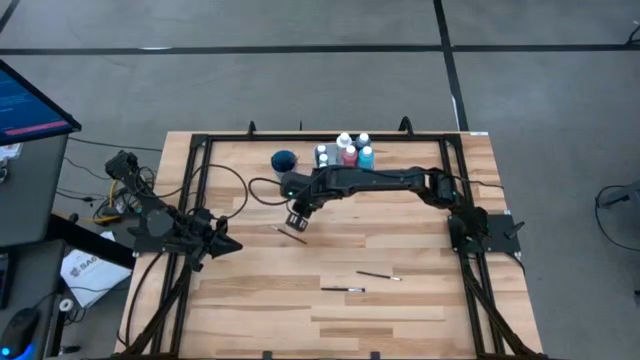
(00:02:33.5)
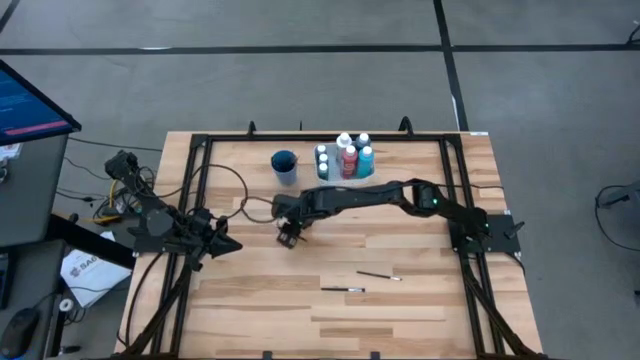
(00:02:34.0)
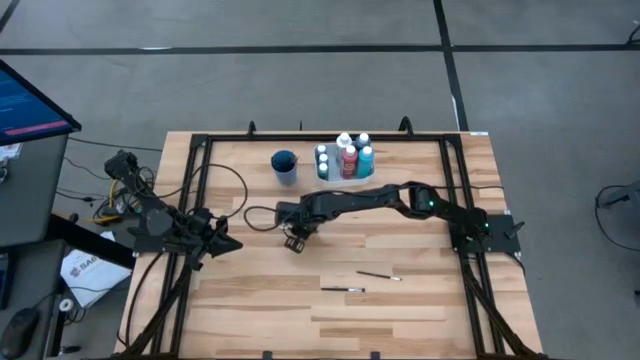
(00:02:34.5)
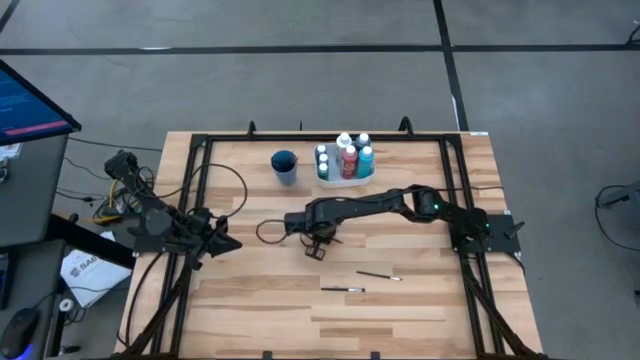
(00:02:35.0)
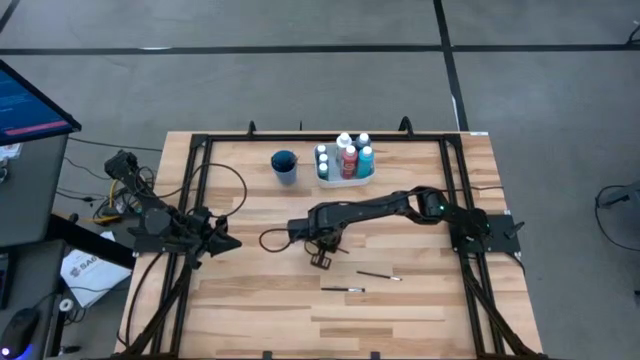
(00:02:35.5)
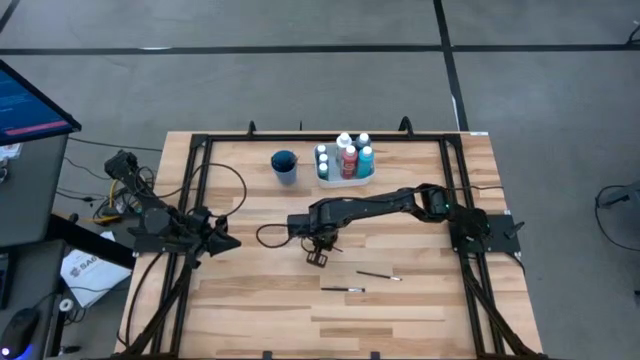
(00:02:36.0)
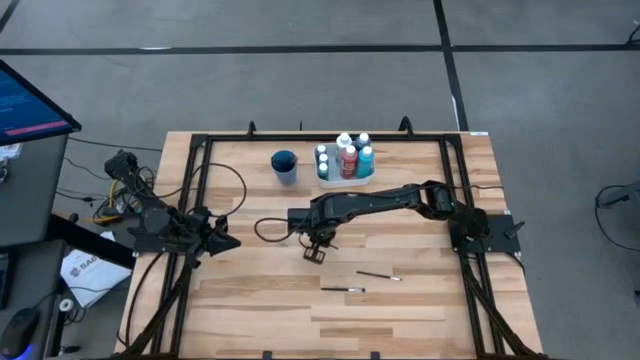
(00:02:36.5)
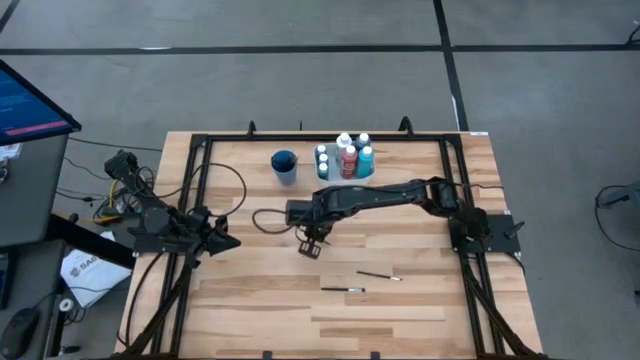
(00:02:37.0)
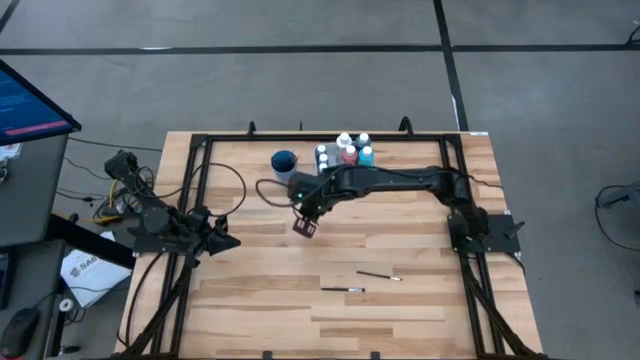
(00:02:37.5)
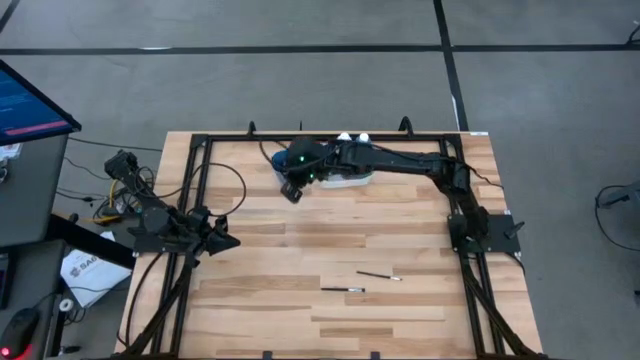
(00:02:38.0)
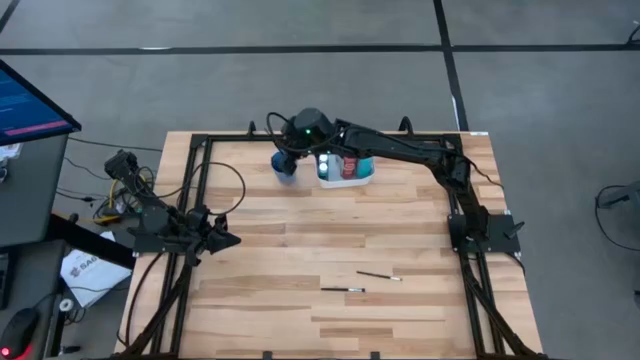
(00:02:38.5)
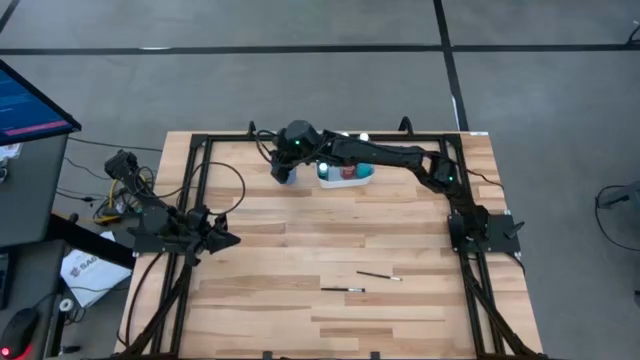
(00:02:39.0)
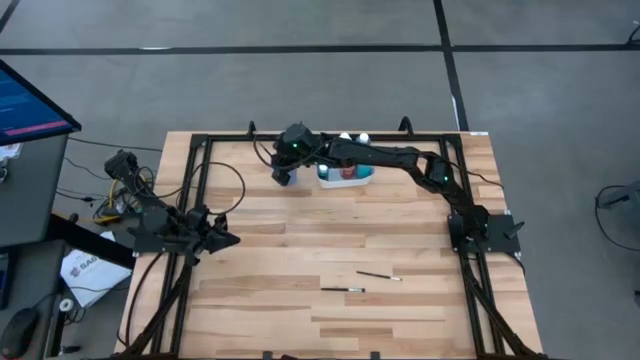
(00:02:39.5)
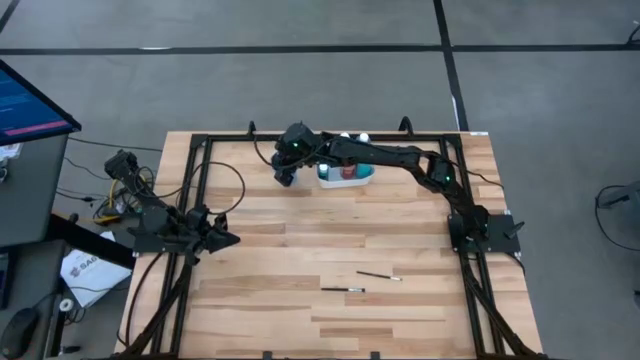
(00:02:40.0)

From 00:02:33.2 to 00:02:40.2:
Task: Pick & Place Paint Supplies
Put the silver and black paint brush into the blue cup

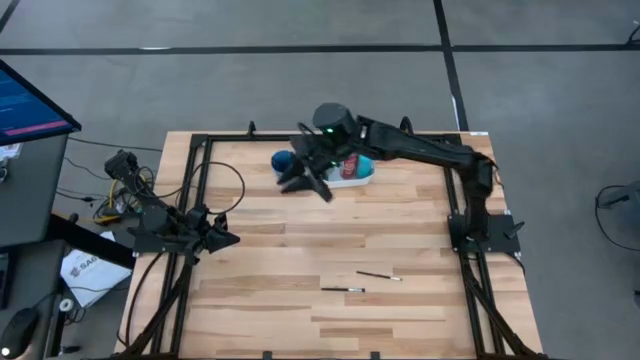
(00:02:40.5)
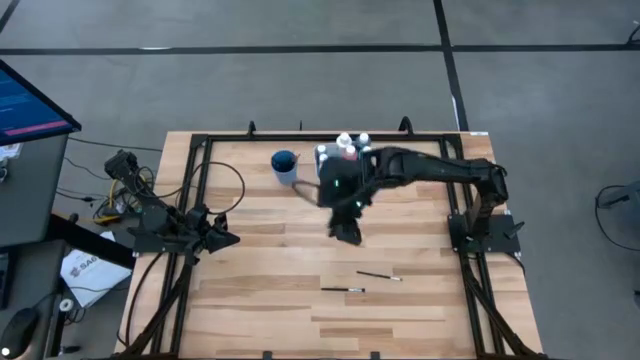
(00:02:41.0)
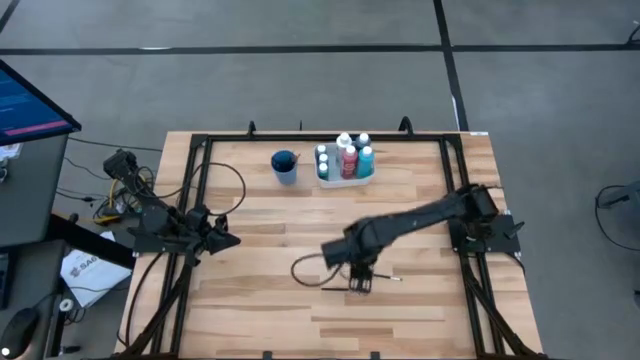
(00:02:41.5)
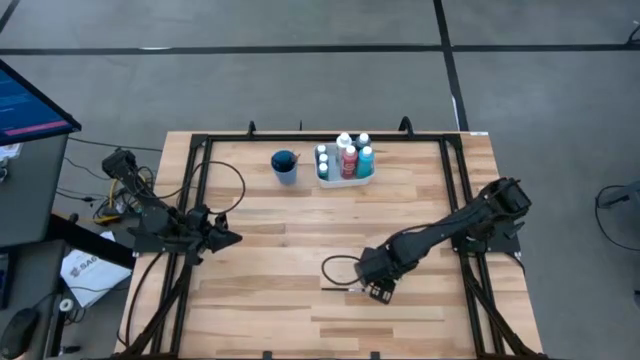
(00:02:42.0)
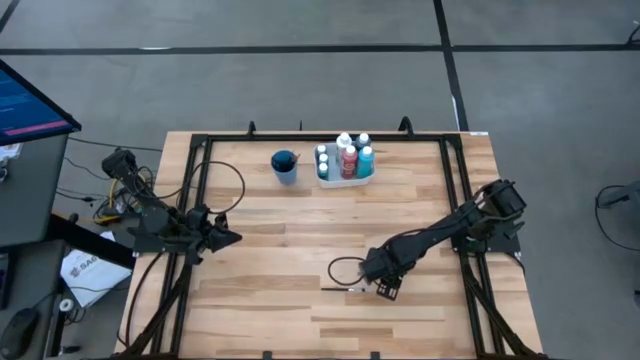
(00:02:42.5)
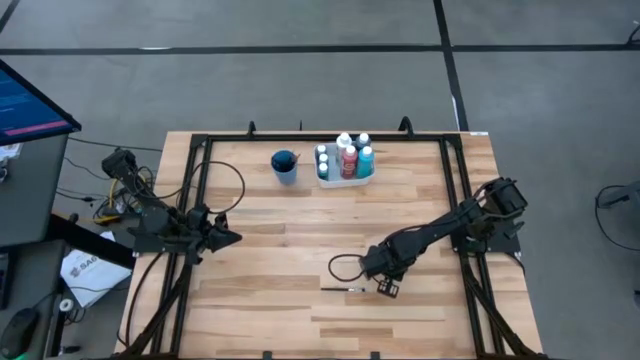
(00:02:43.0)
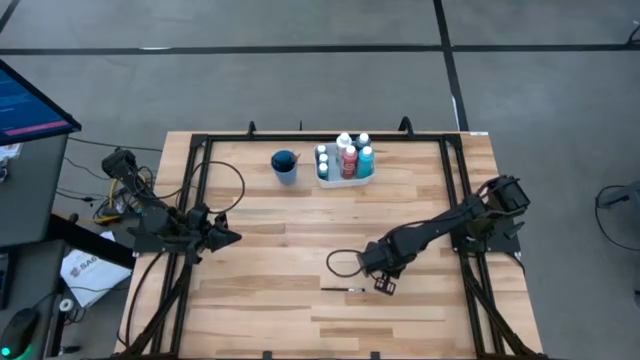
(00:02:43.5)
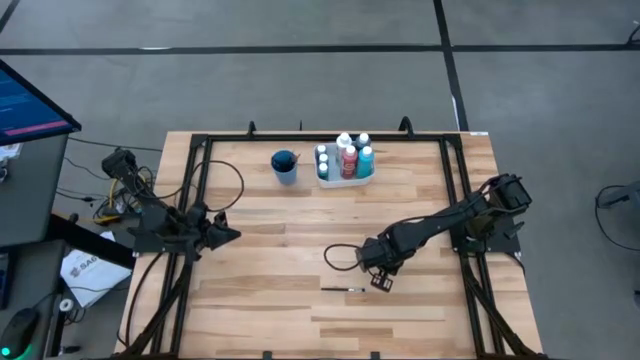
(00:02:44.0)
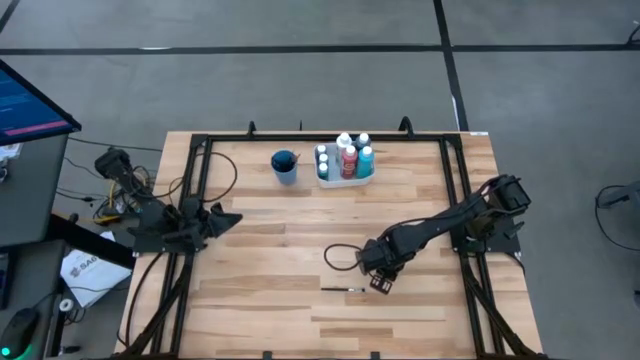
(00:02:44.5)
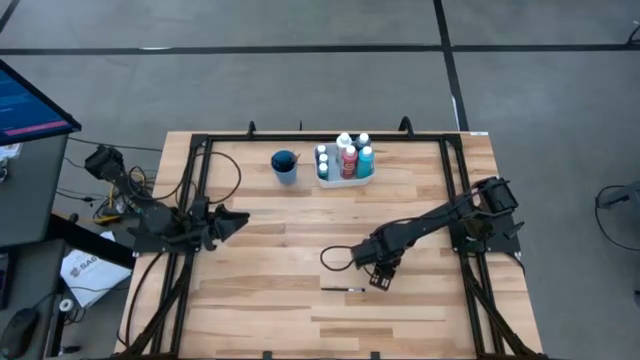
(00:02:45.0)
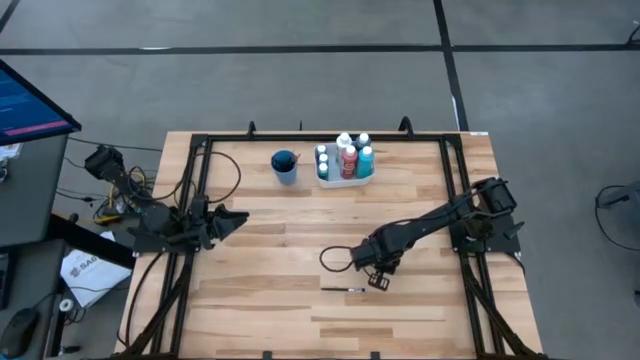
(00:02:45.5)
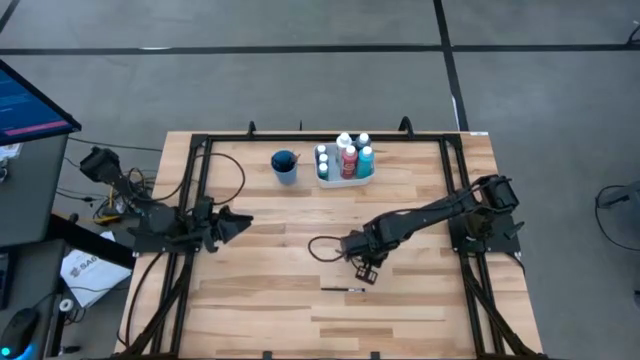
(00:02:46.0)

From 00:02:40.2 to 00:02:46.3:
Put the silver and black paint brush into the blue cup

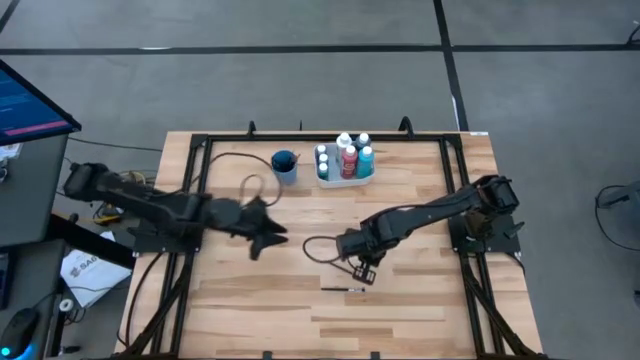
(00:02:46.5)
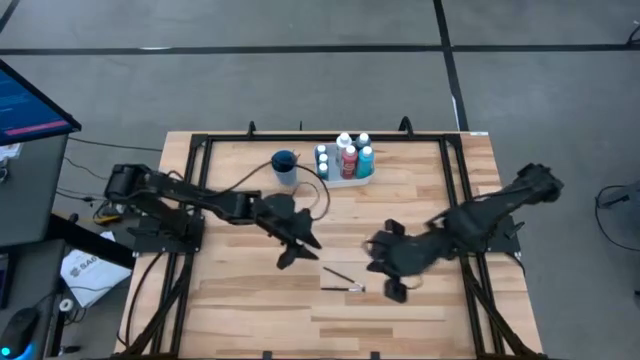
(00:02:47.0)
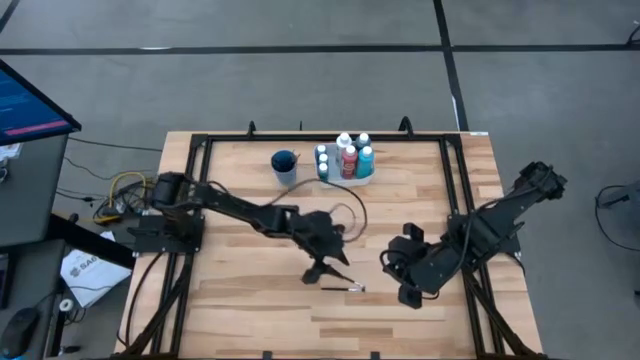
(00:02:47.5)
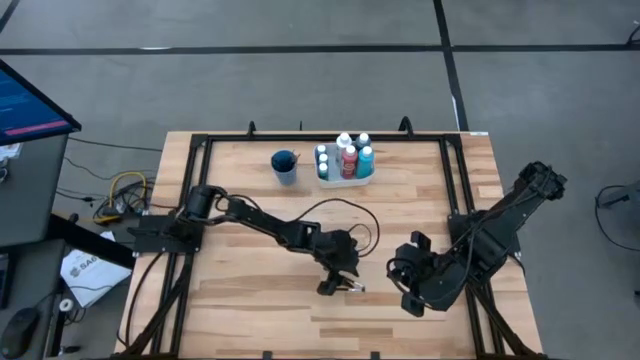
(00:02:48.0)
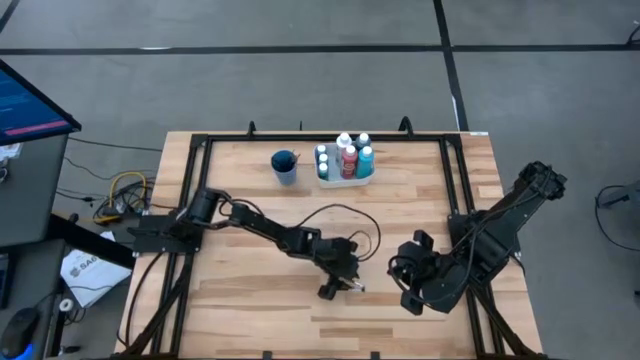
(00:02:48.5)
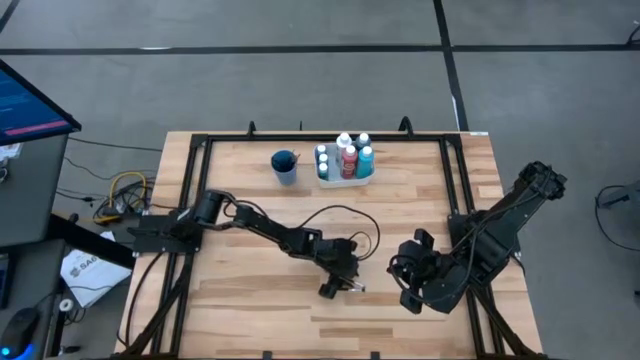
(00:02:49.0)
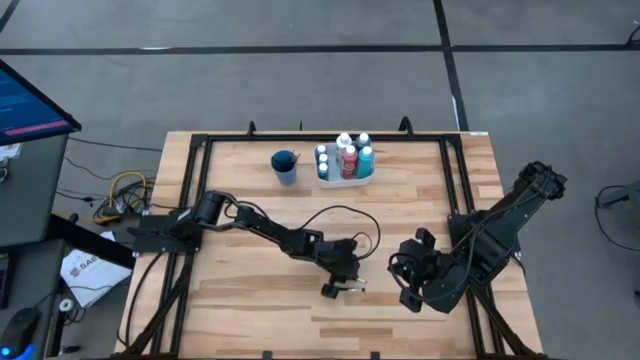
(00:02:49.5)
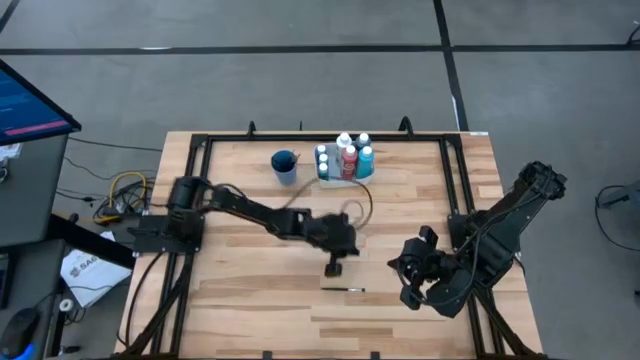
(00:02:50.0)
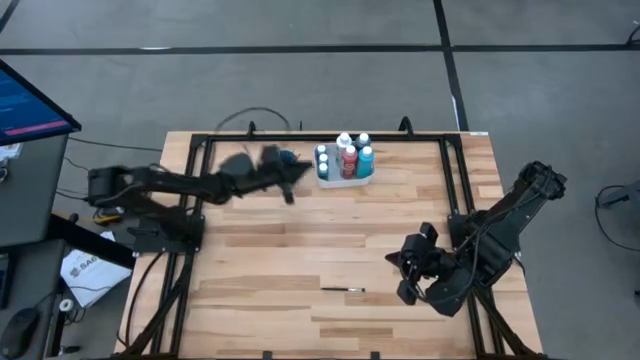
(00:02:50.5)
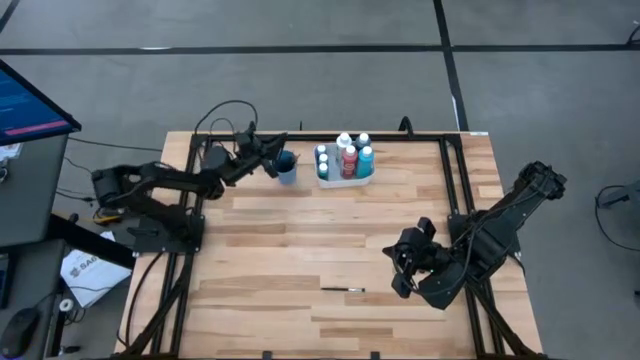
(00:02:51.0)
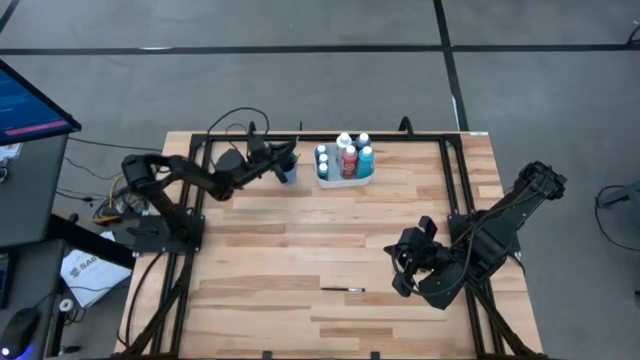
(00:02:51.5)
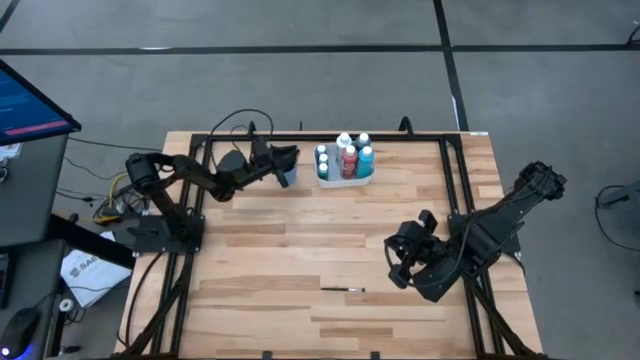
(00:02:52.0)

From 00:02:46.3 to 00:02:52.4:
Put the silver and black paint brush into the blue cup
